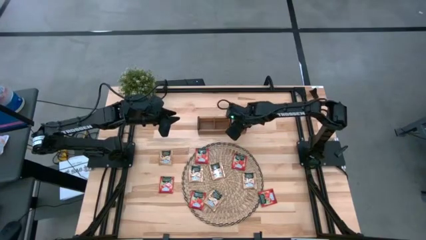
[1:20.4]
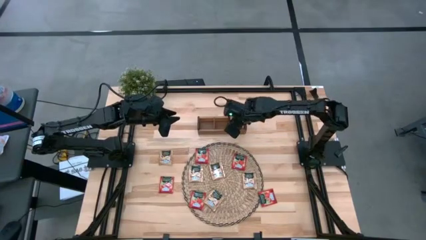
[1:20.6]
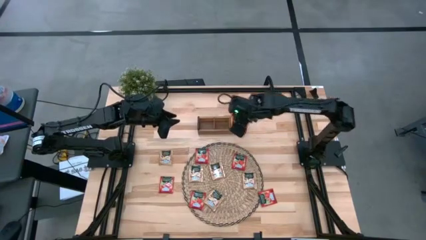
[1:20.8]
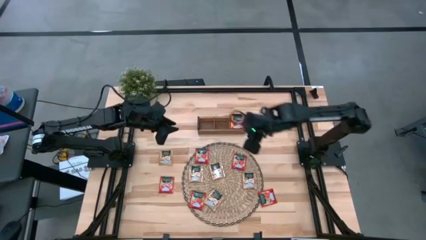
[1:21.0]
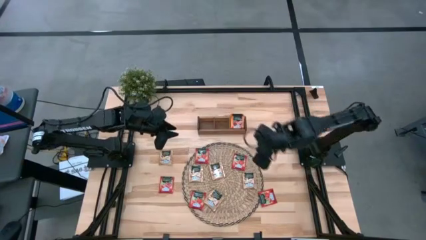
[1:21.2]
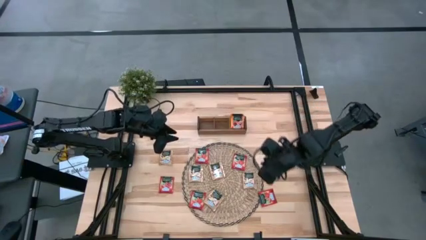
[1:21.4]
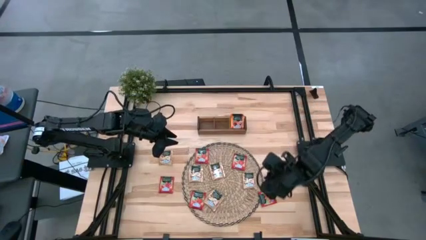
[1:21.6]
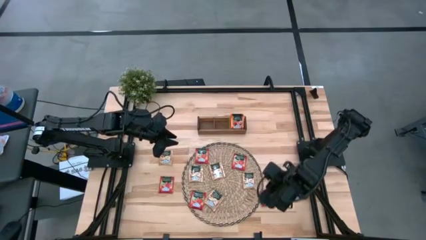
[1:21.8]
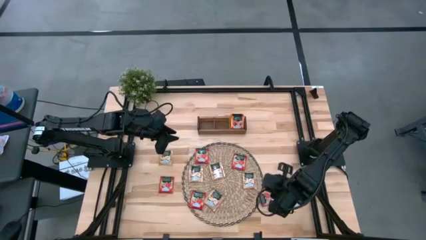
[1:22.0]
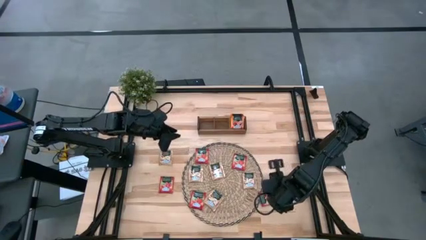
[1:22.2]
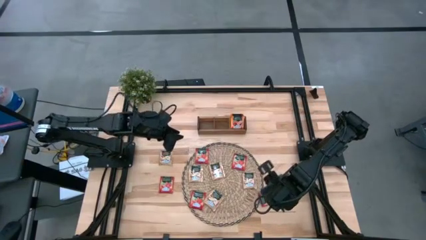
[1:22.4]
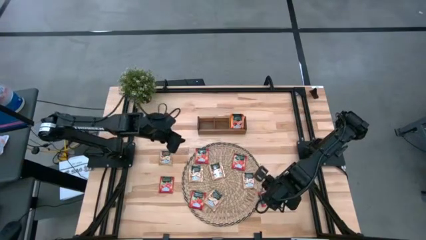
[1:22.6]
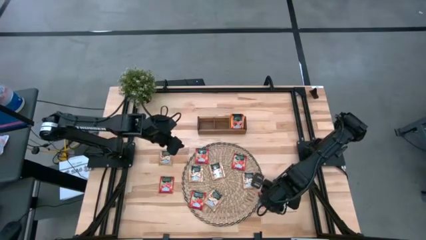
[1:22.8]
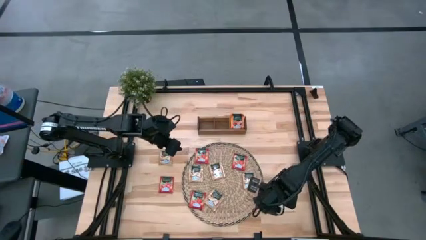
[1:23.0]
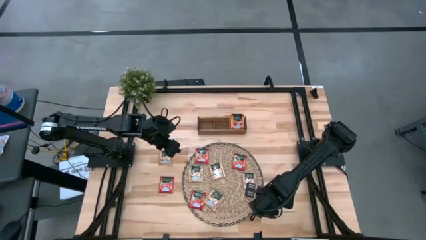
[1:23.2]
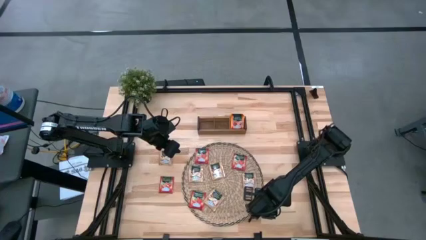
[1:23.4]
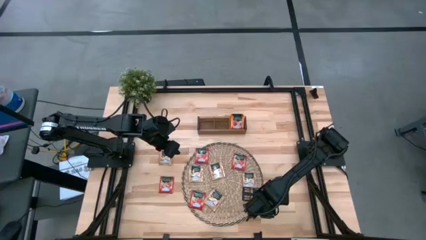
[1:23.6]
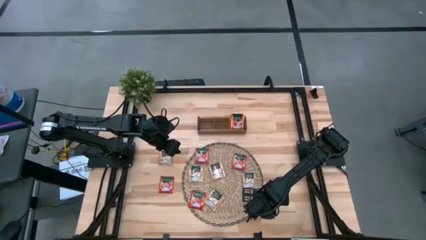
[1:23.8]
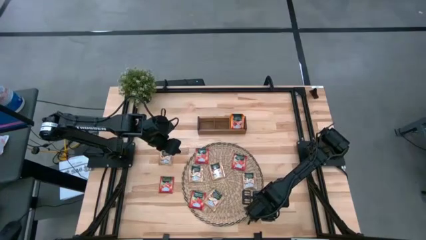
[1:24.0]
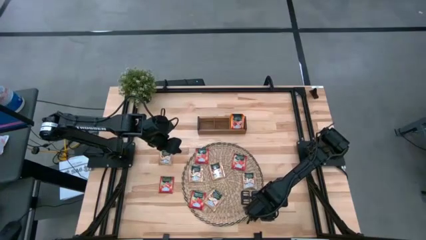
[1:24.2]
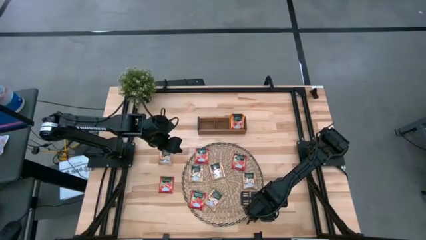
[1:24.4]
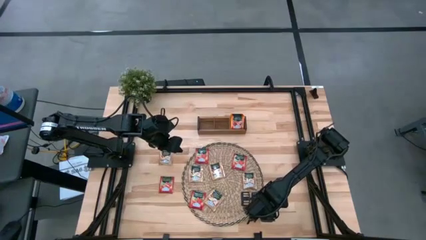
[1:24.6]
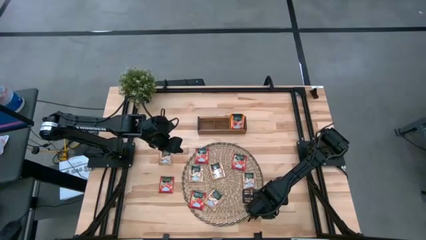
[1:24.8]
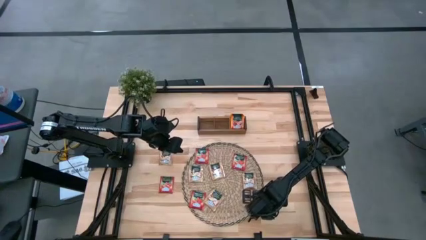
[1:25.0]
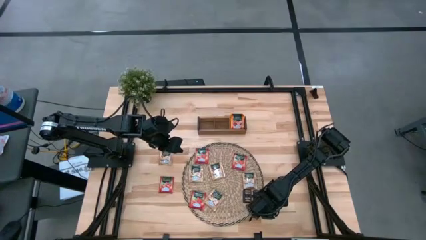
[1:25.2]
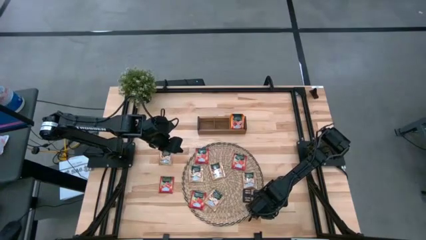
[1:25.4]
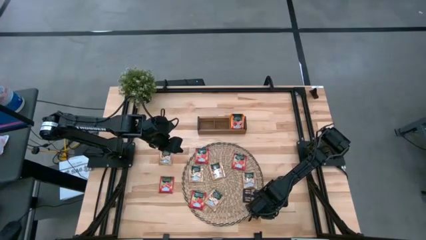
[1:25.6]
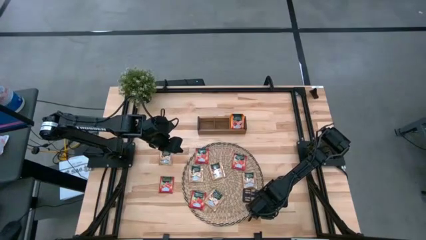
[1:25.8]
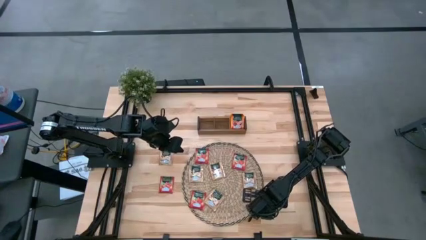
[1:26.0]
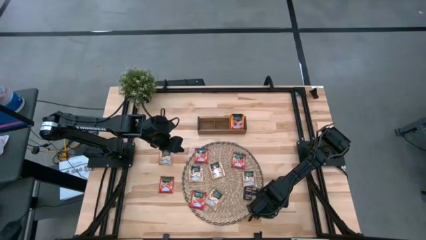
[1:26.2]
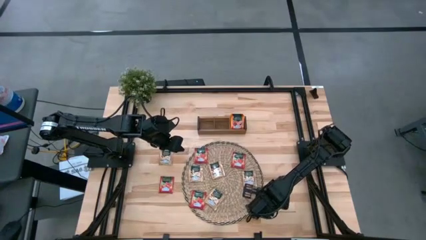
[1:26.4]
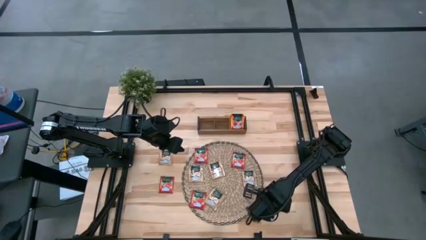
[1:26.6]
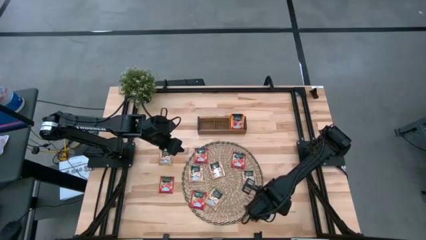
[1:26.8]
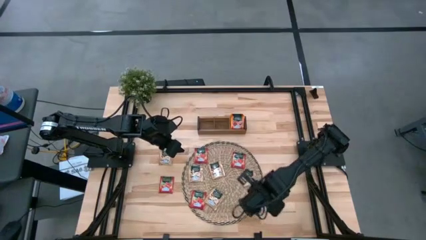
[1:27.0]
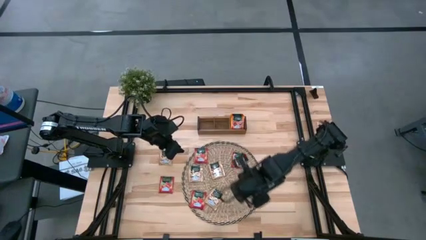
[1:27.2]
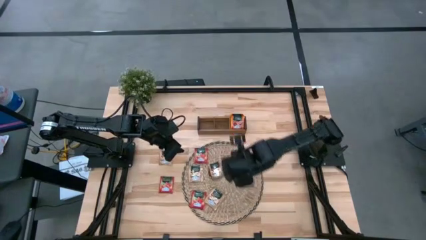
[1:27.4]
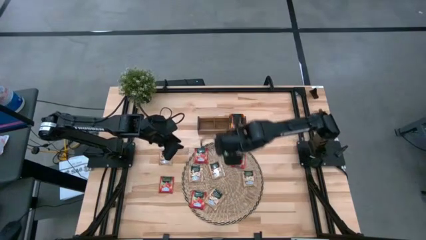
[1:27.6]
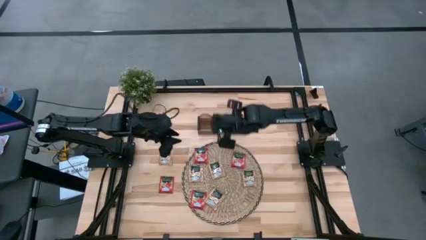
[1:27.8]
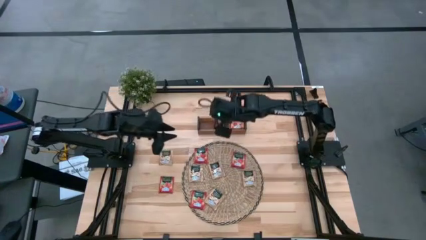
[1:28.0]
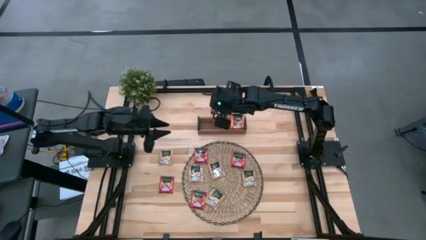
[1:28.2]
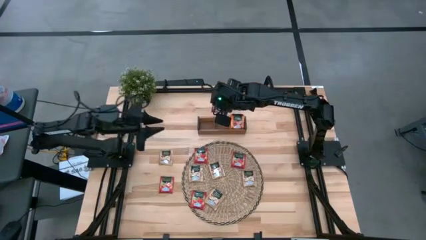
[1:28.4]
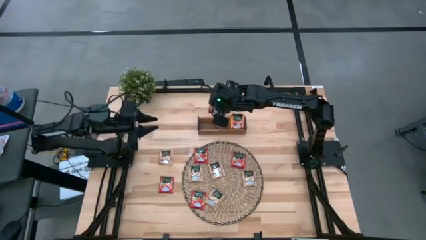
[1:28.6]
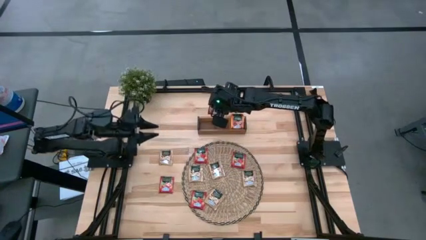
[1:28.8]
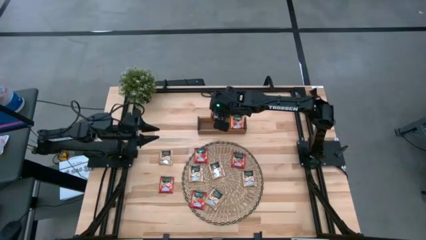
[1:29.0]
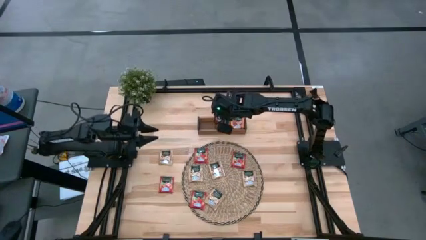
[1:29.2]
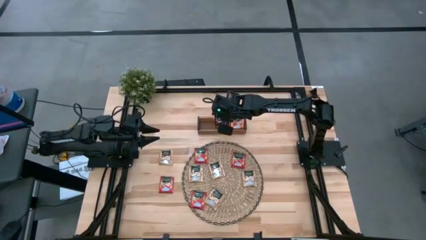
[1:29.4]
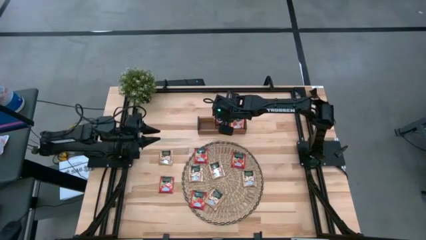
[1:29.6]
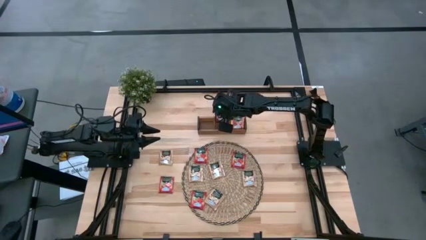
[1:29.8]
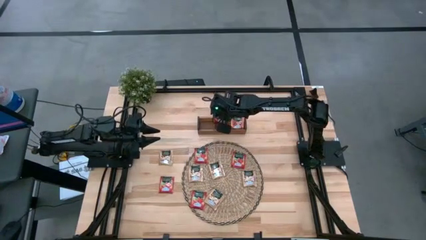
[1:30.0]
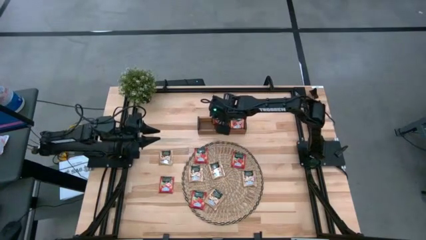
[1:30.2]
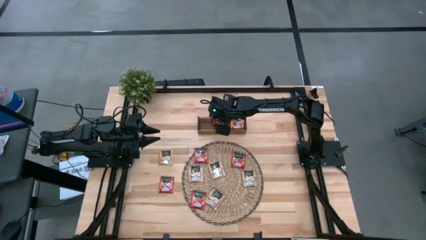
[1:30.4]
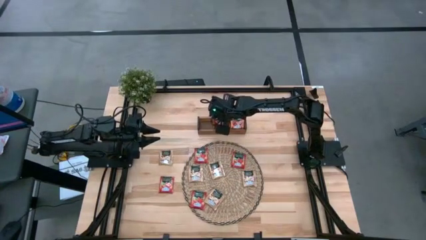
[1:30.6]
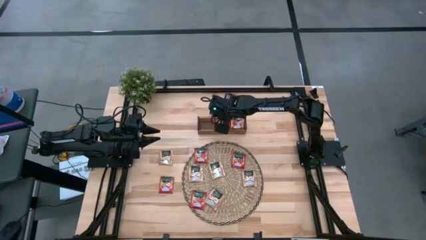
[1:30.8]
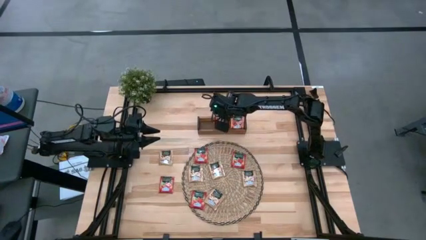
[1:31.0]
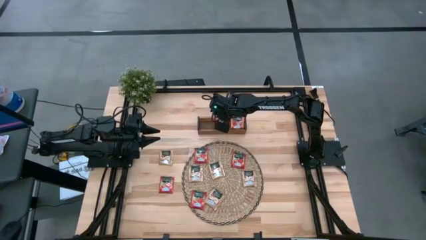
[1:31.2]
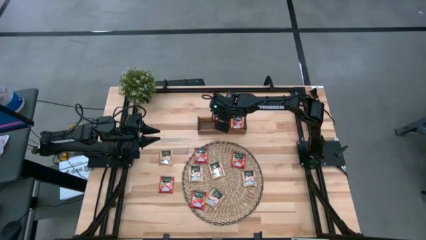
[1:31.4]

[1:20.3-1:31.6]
Task: Pick & Place Tea
Put the red tea bag in the middle of the wooden organizer

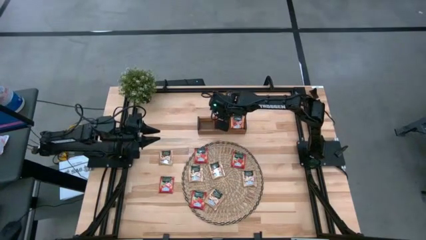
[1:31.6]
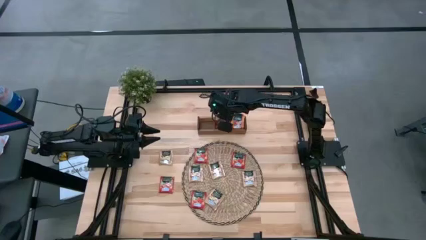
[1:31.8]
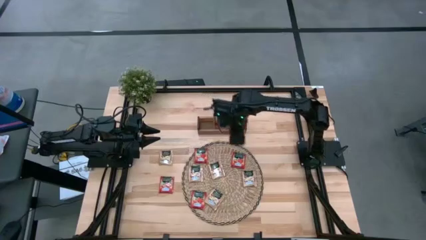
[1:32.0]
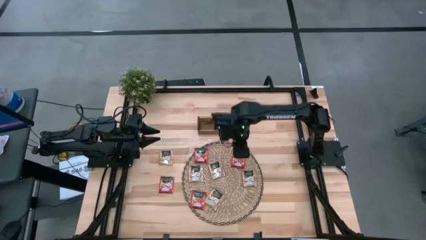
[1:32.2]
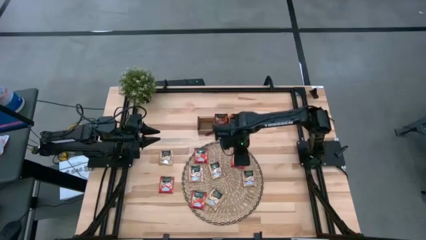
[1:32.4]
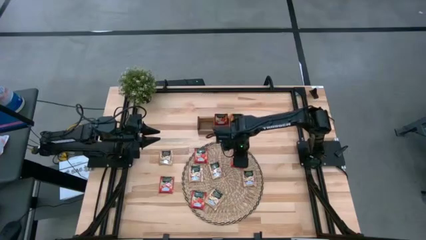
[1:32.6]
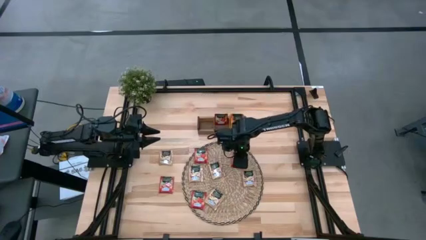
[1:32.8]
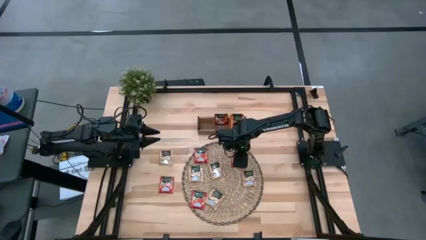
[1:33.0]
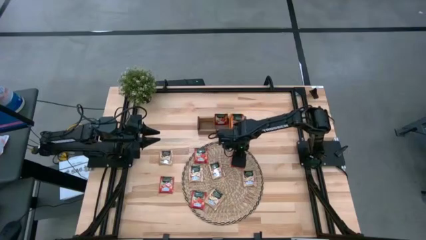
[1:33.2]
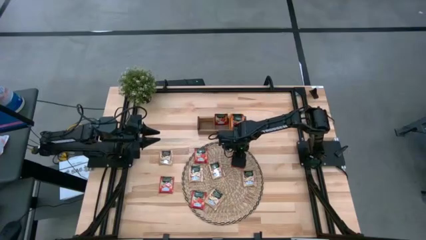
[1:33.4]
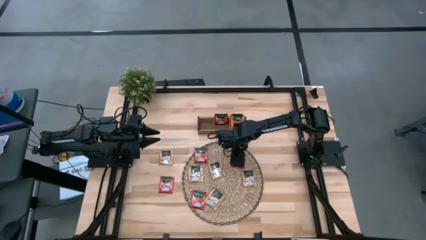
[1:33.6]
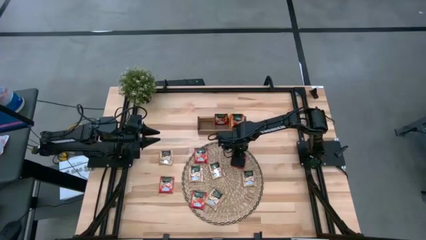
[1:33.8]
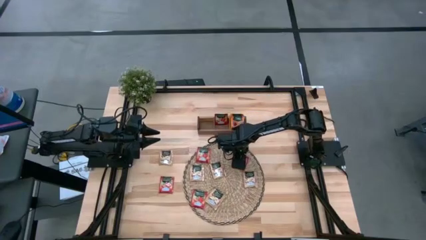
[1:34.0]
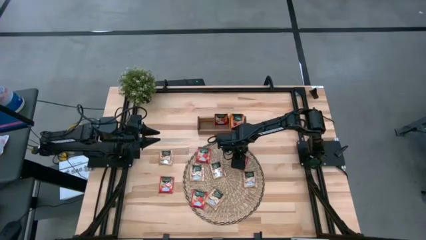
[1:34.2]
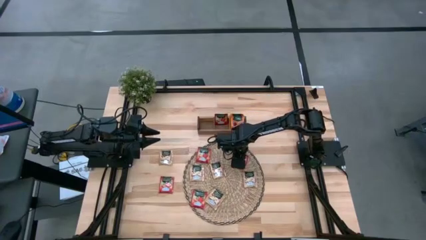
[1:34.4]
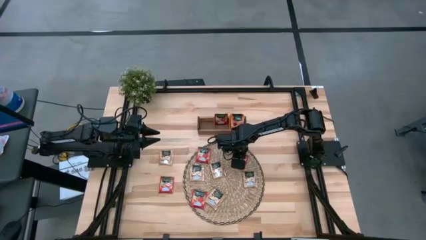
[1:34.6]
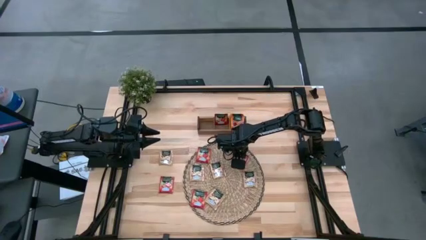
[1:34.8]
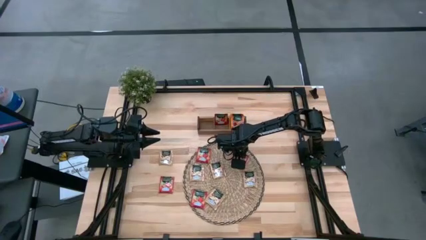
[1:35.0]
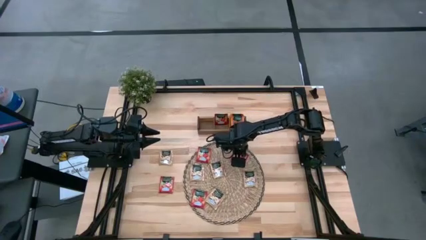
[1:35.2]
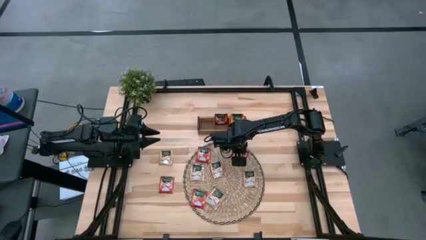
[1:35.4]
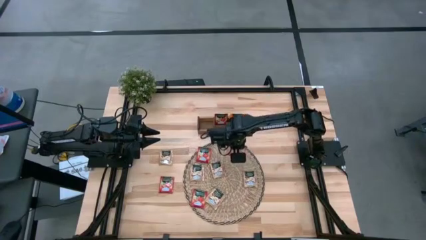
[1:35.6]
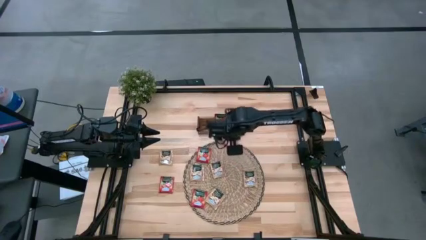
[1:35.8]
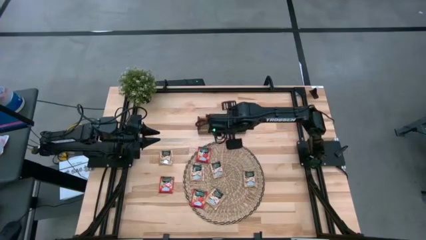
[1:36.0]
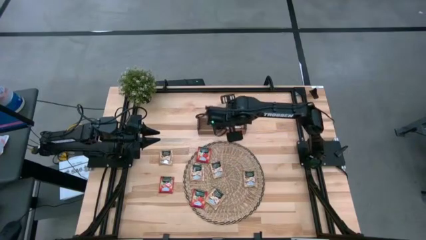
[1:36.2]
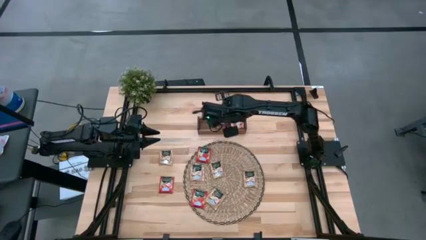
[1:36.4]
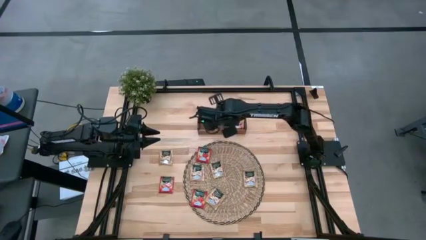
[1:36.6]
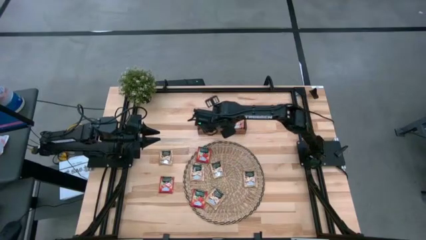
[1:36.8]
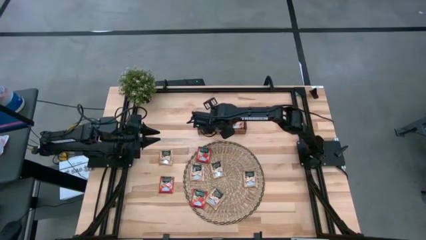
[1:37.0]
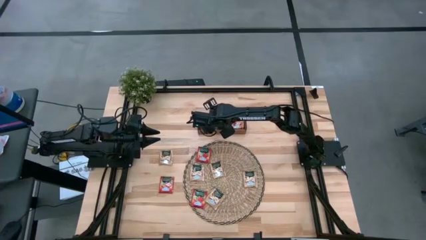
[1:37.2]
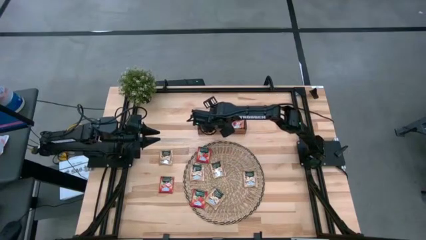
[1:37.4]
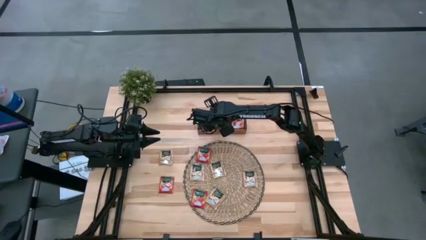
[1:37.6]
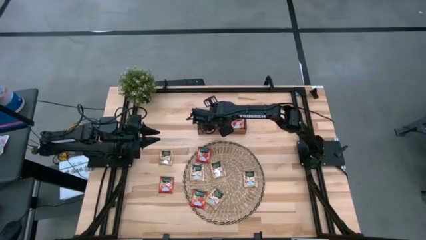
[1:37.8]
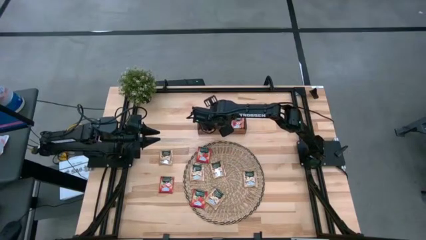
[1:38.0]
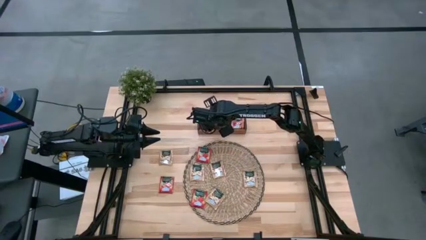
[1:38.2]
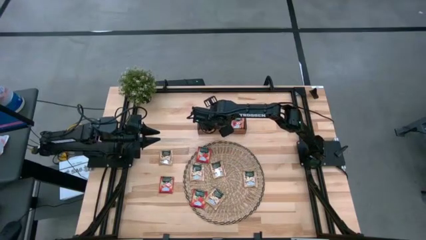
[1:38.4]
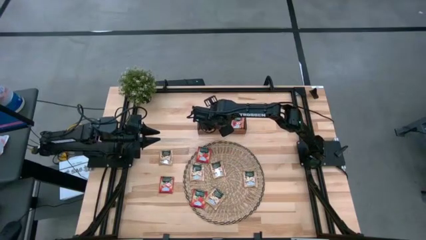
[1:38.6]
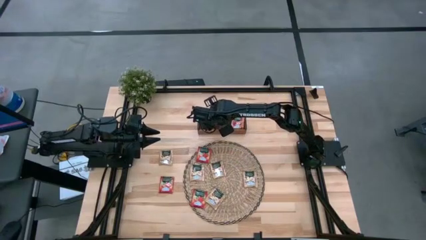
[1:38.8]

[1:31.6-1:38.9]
Put the red tea bag in the middle of the wooden organizer
